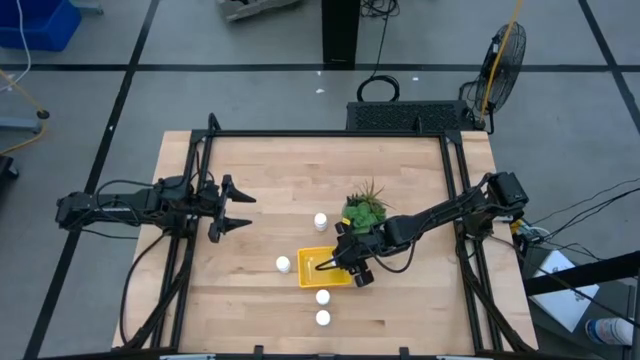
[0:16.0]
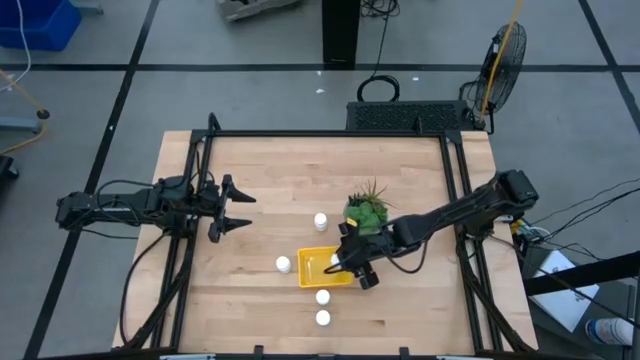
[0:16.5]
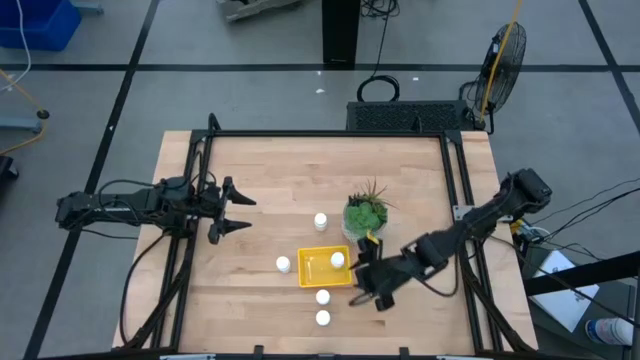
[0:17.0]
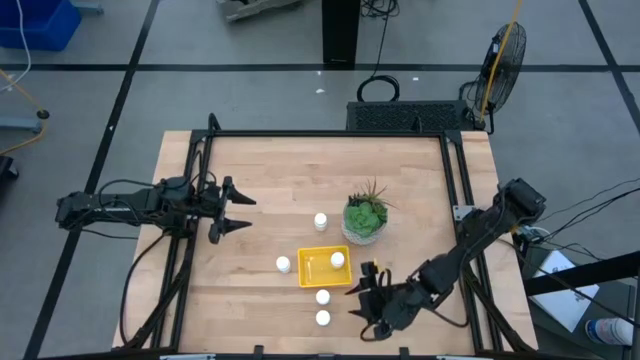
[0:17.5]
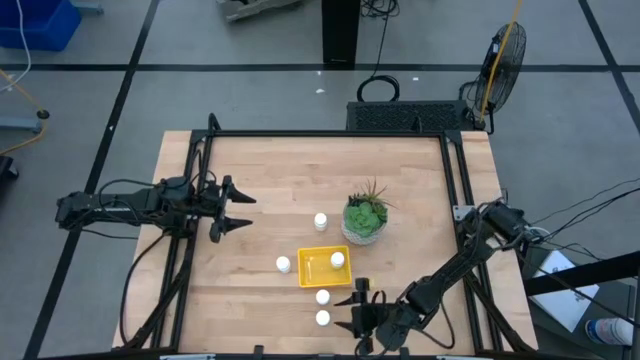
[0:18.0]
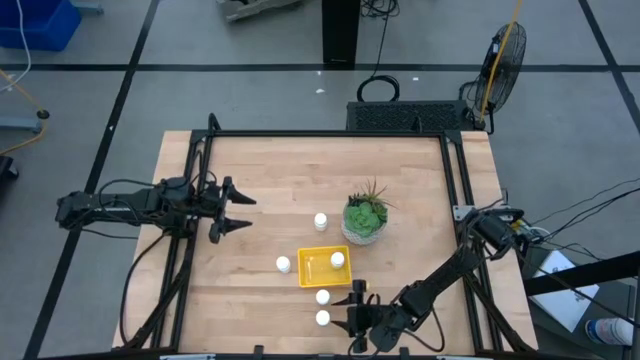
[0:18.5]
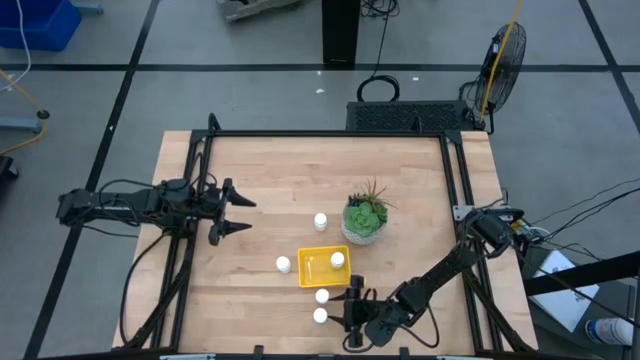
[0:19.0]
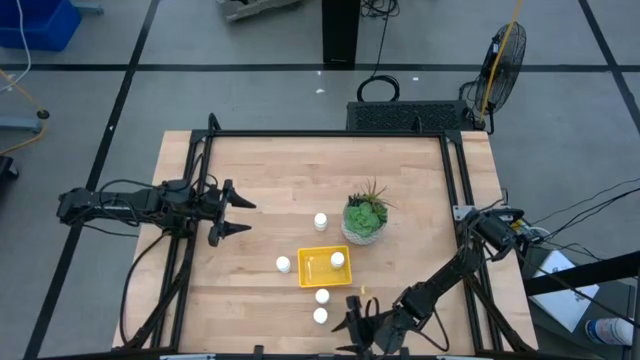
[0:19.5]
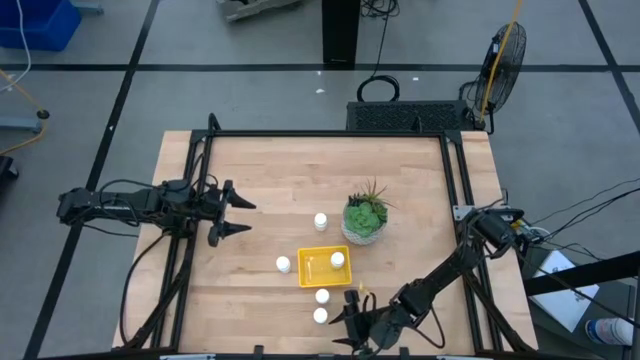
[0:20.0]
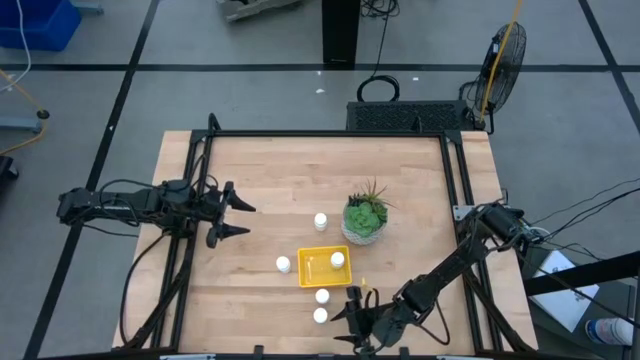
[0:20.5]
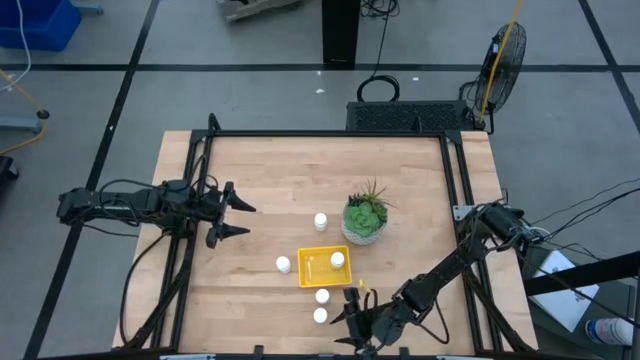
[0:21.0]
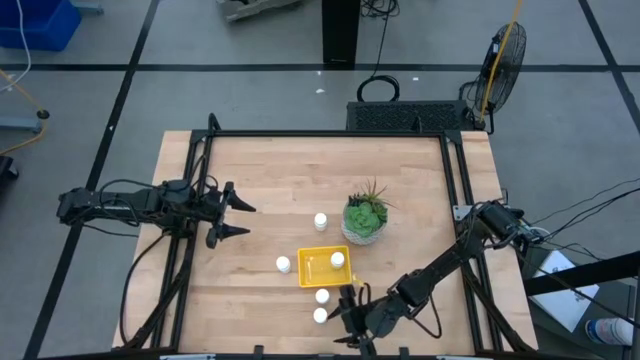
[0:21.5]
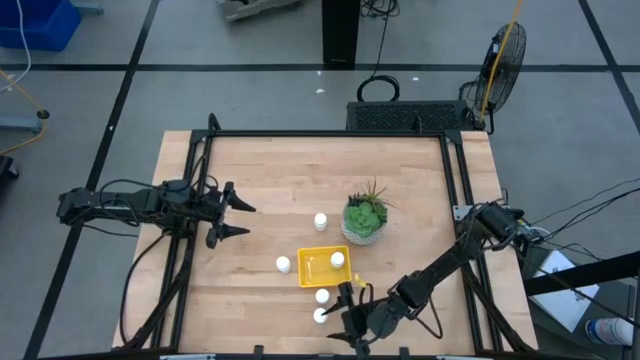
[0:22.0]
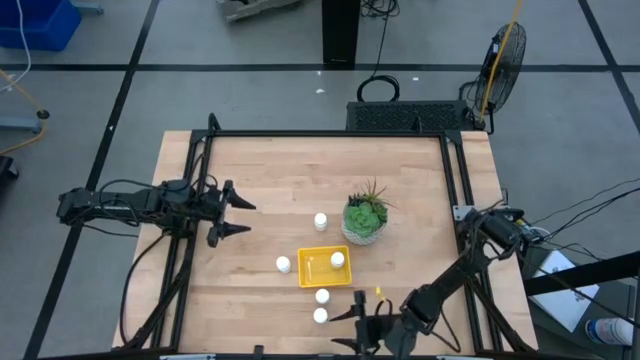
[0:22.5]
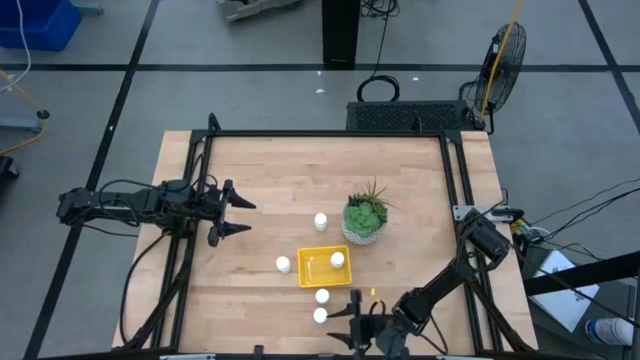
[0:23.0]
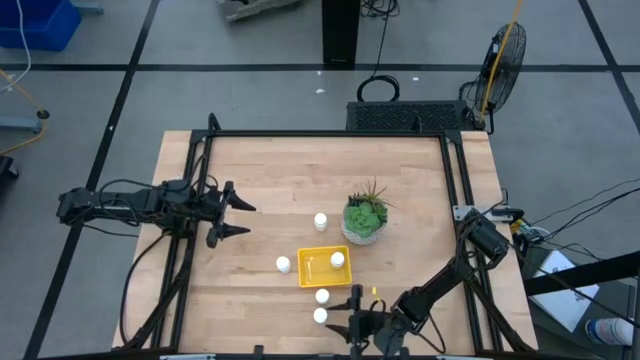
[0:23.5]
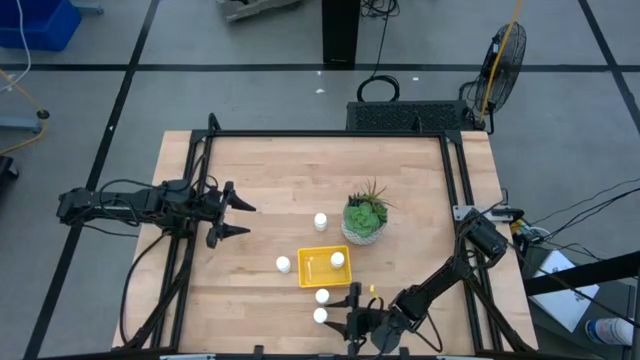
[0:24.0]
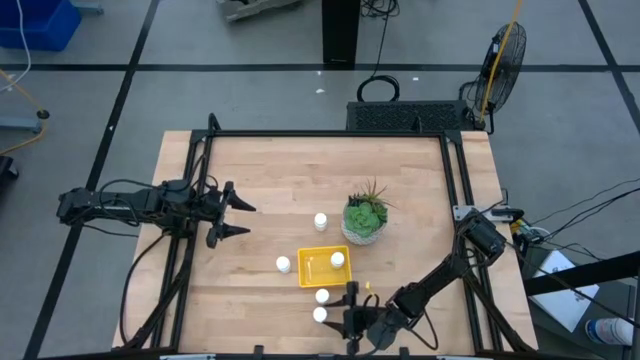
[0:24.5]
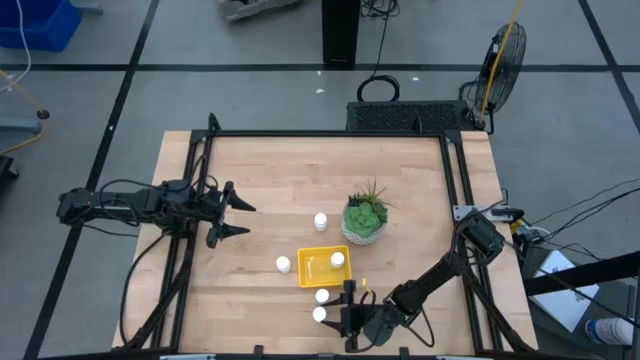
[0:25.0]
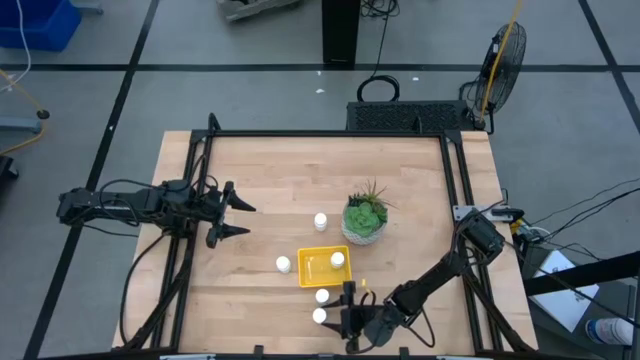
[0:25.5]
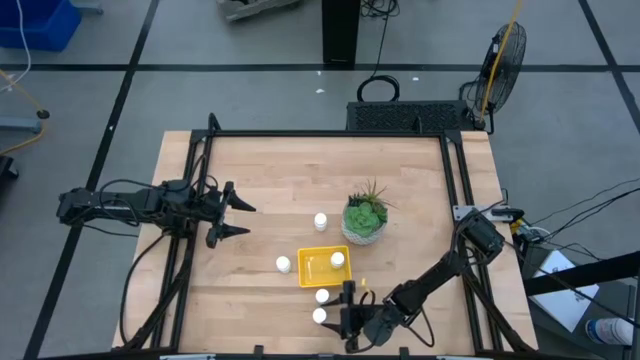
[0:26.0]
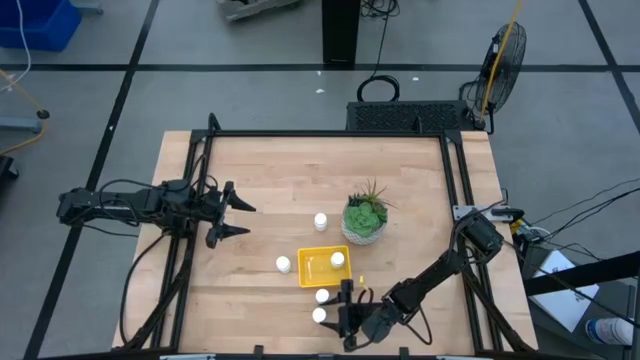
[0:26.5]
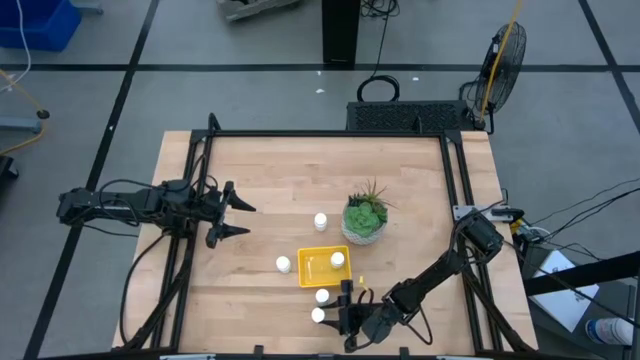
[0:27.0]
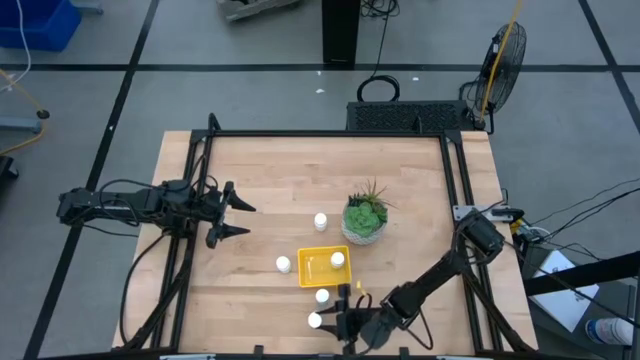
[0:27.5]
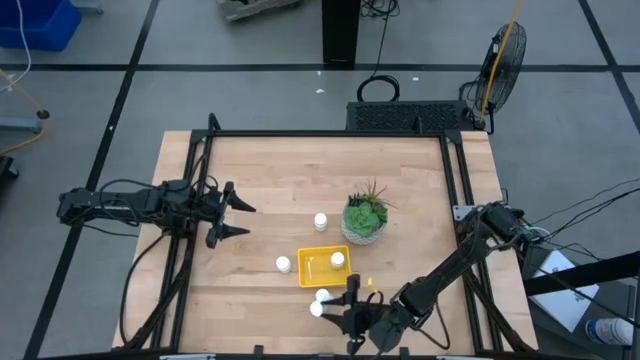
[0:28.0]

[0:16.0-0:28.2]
Task: Pick and place pill bottles into a basket
Put the white pill bottle into the yellow bin

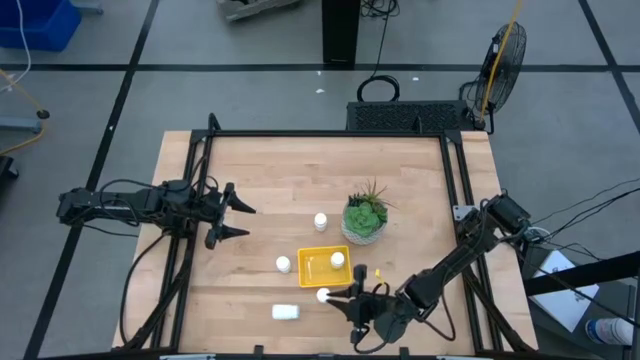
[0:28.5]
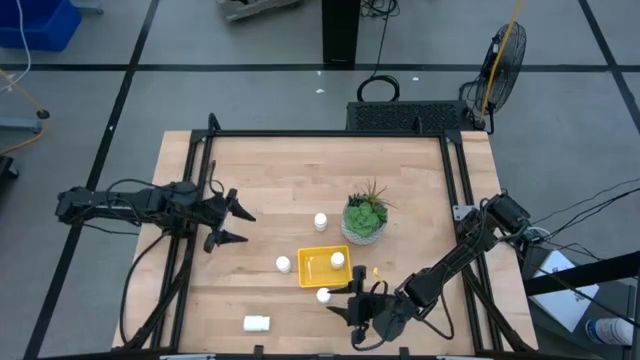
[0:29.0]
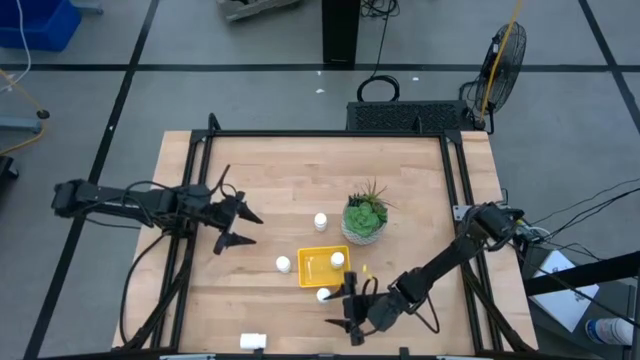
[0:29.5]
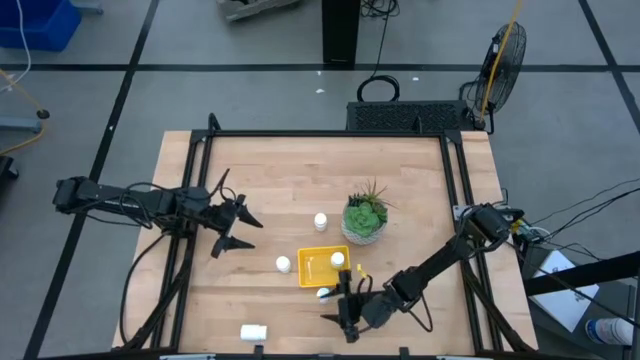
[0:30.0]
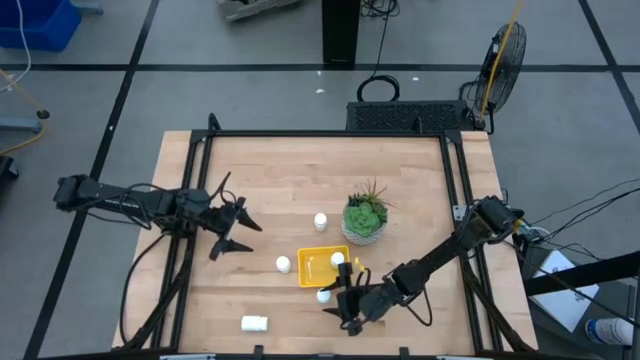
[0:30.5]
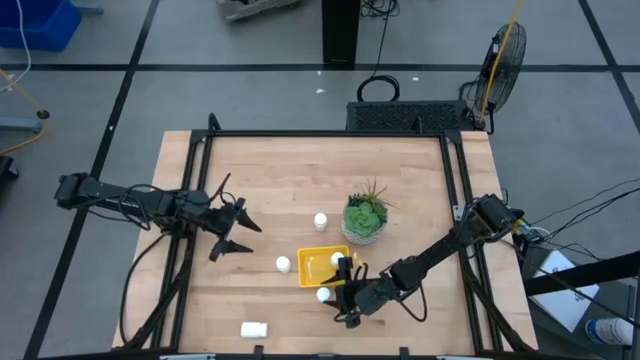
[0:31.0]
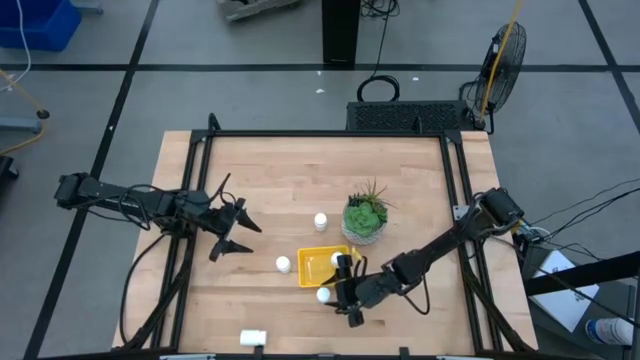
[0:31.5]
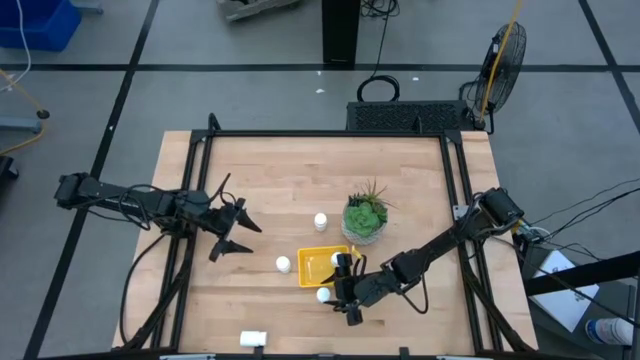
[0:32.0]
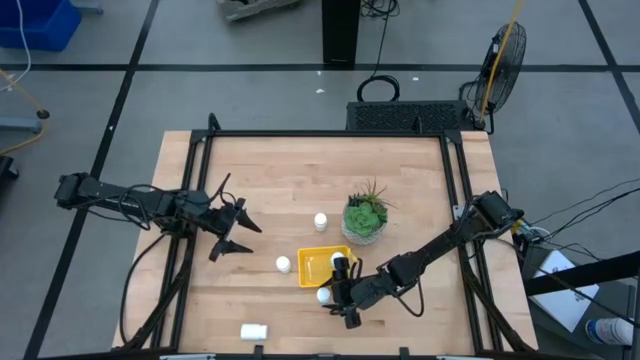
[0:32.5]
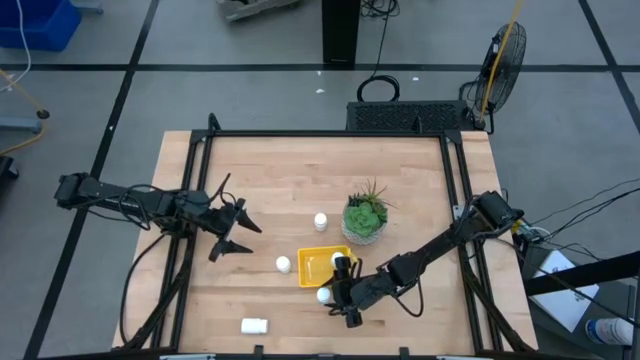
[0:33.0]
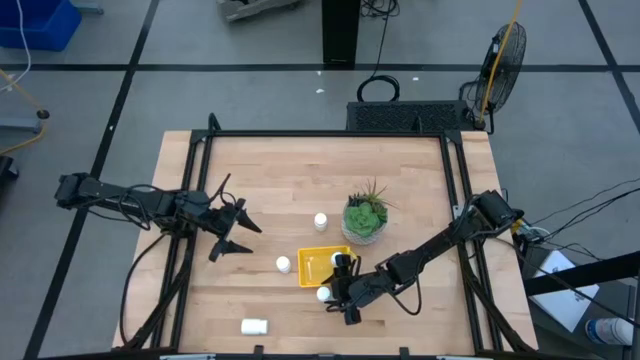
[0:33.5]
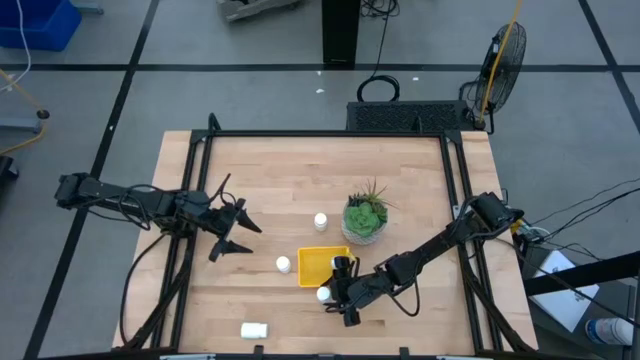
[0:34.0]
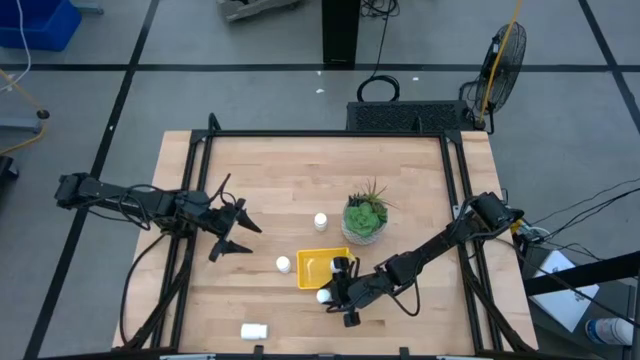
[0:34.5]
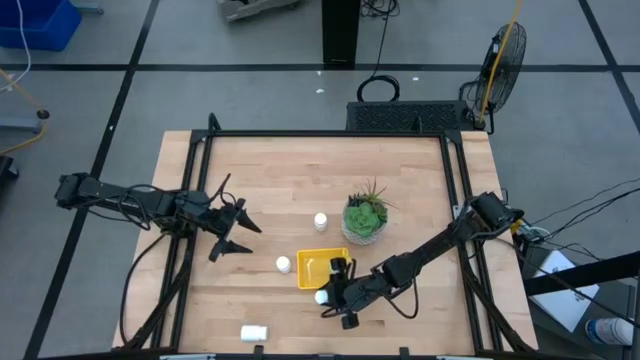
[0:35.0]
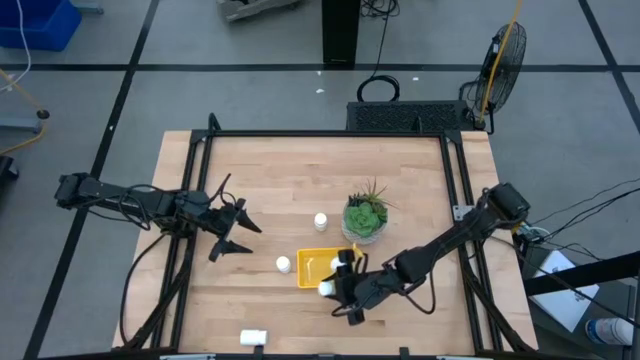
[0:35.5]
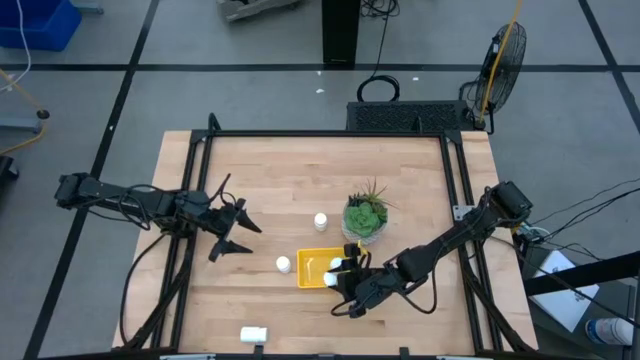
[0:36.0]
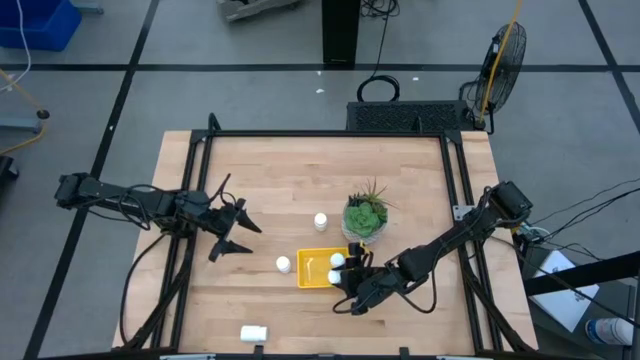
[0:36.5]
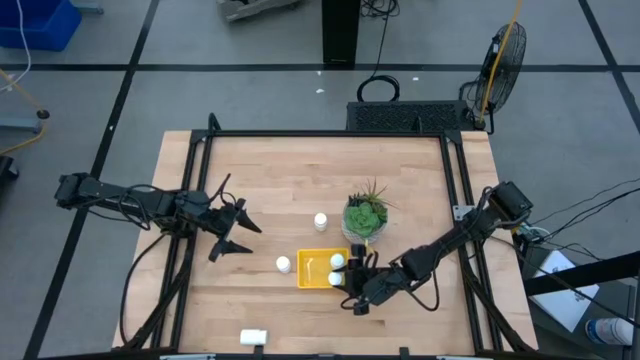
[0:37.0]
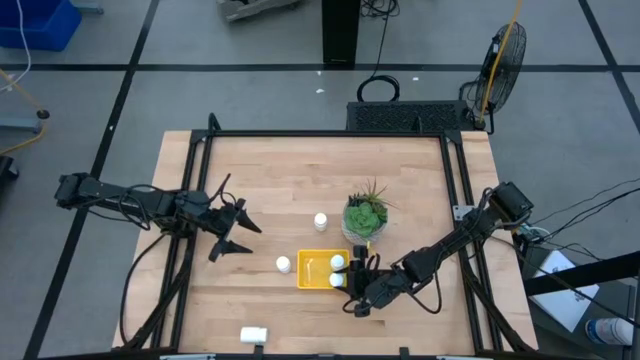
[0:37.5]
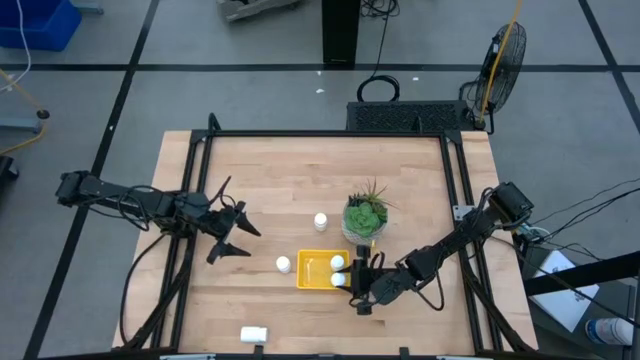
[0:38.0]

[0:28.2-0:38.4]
Put the white pill bottle into the yellow bin
